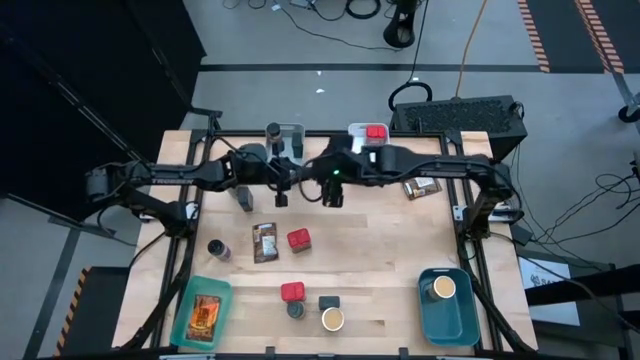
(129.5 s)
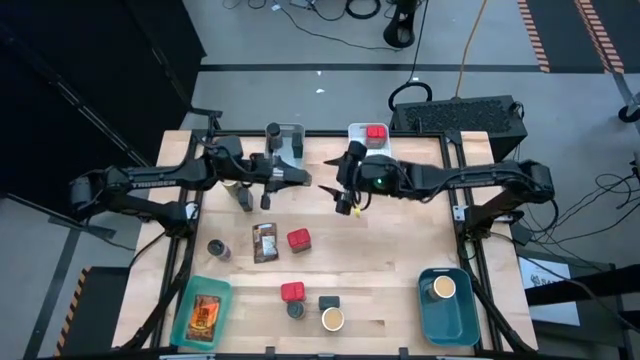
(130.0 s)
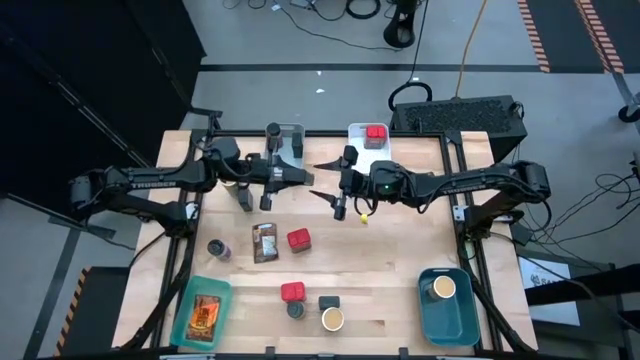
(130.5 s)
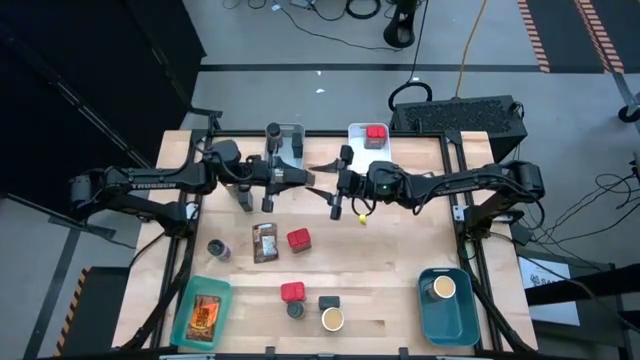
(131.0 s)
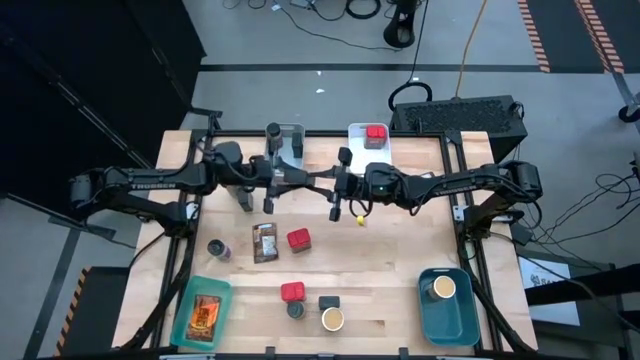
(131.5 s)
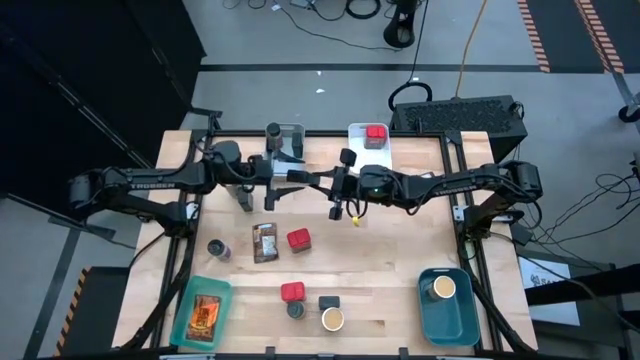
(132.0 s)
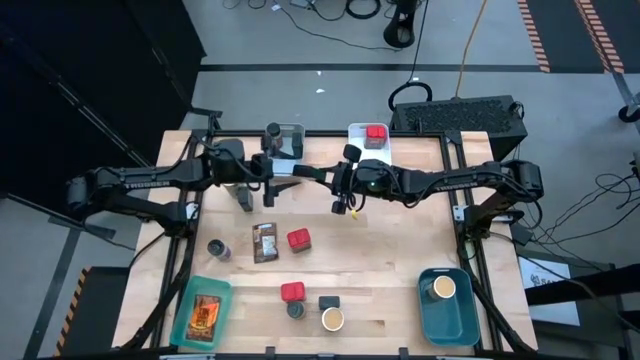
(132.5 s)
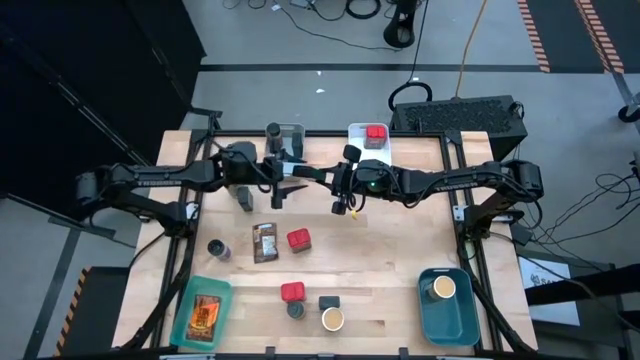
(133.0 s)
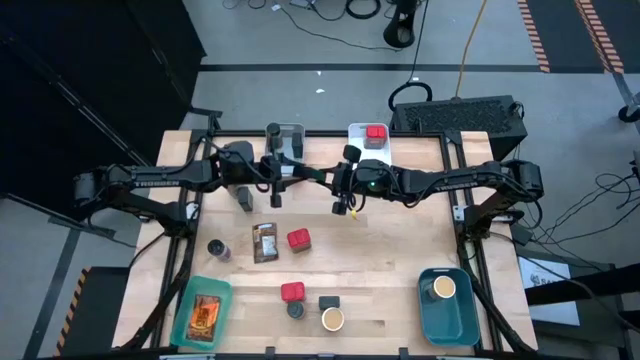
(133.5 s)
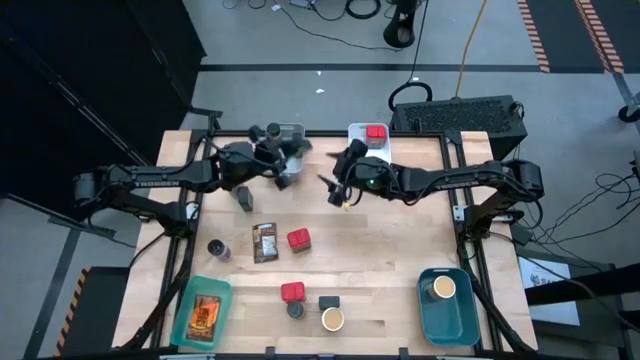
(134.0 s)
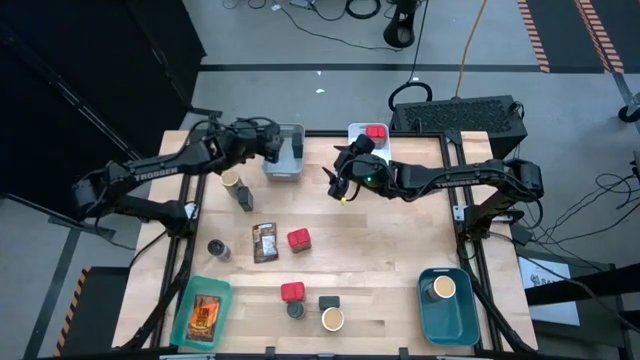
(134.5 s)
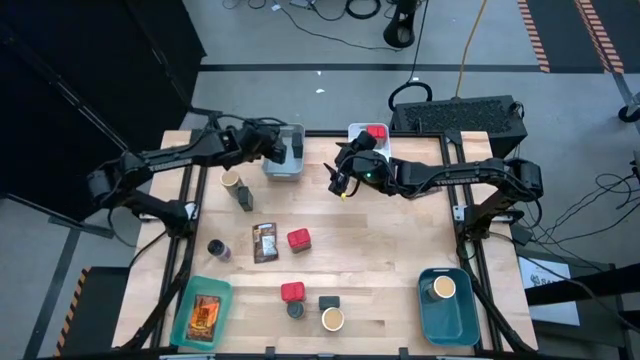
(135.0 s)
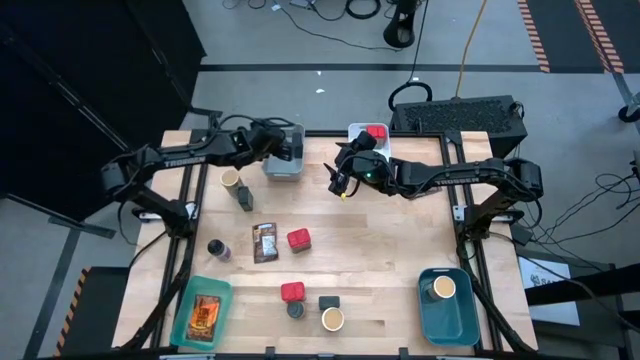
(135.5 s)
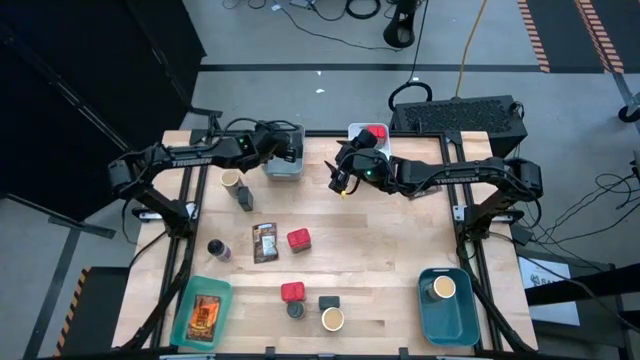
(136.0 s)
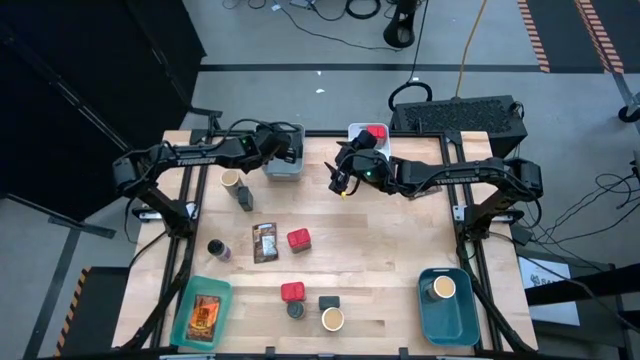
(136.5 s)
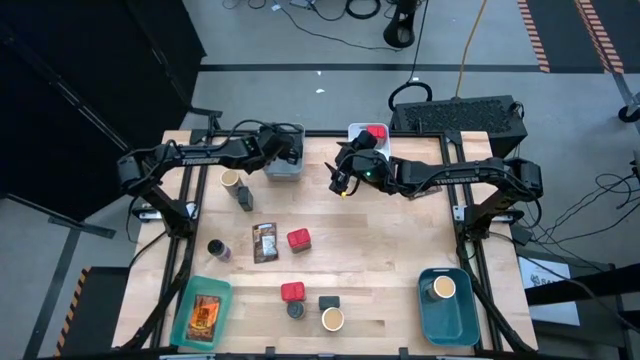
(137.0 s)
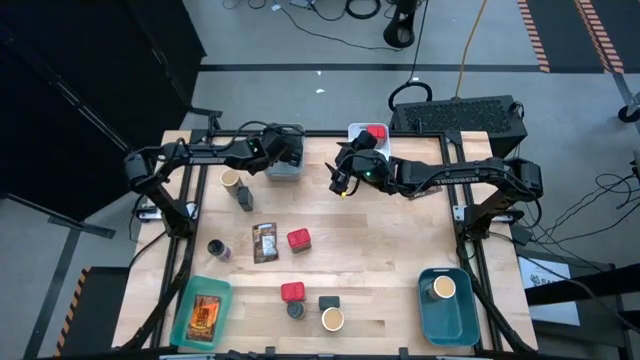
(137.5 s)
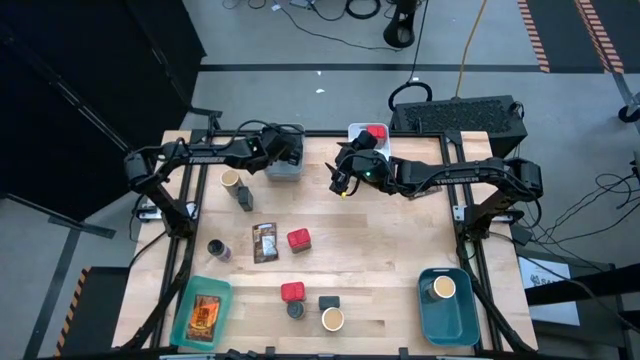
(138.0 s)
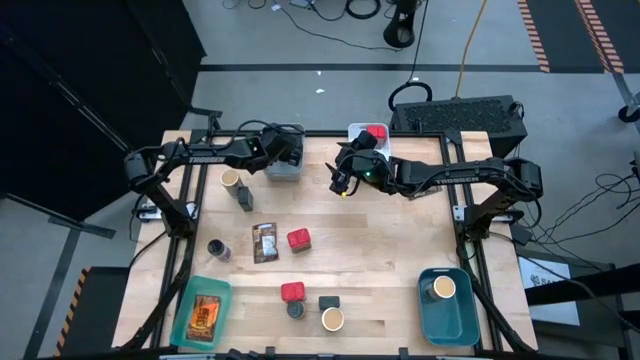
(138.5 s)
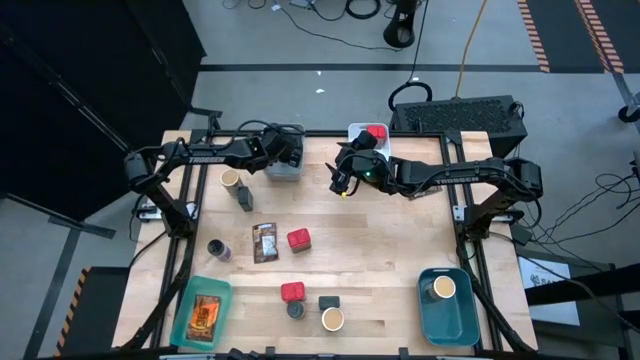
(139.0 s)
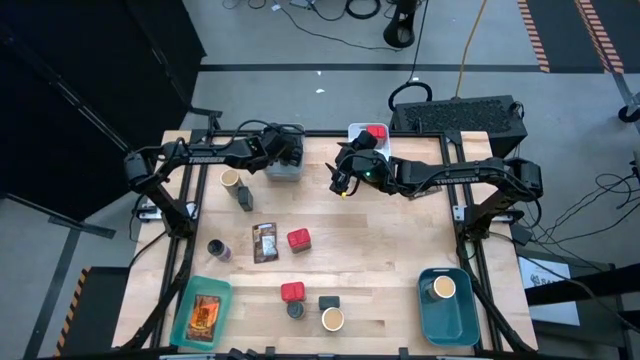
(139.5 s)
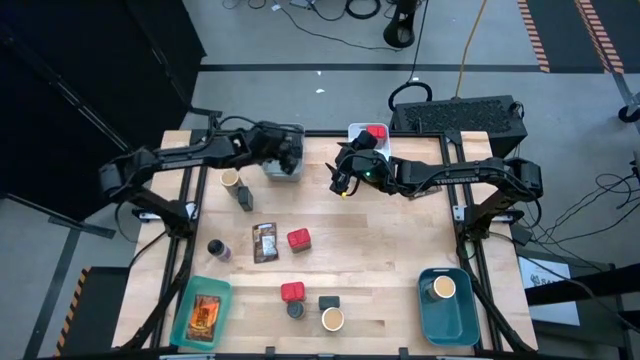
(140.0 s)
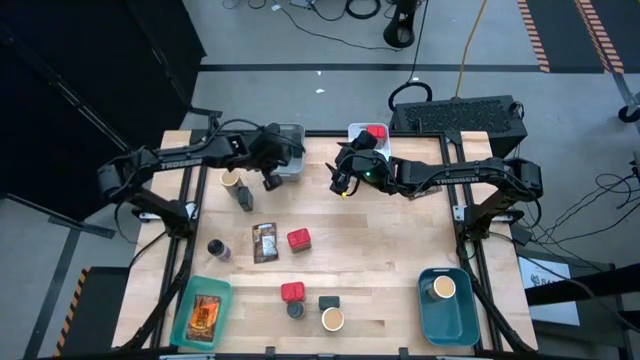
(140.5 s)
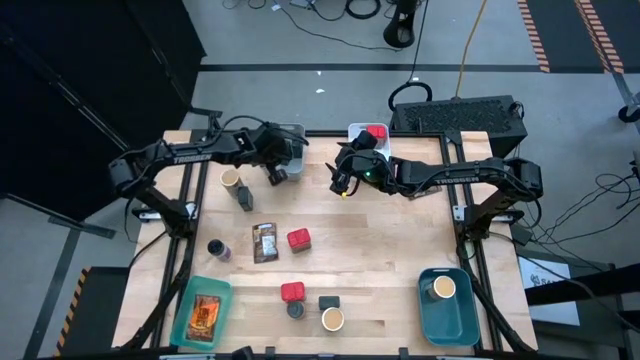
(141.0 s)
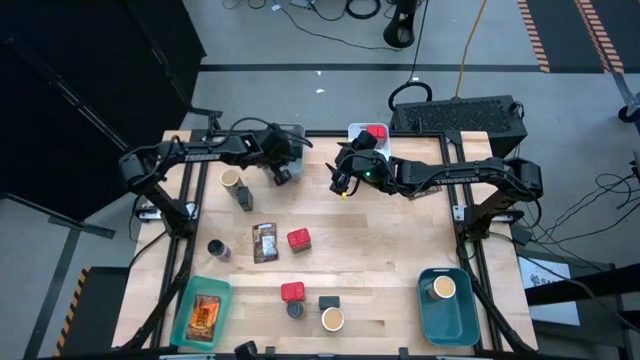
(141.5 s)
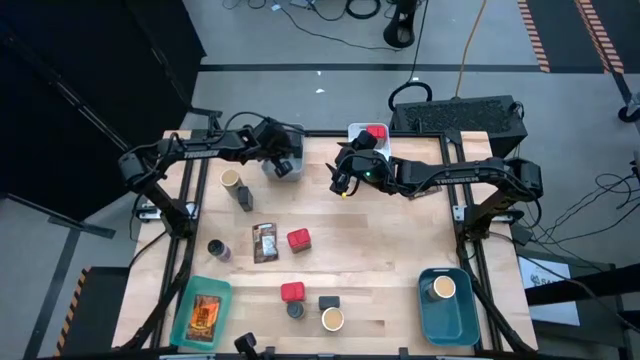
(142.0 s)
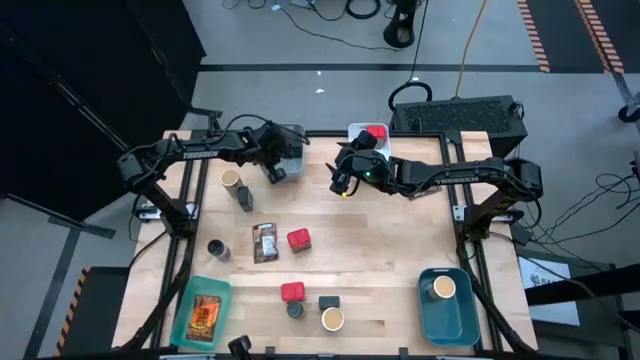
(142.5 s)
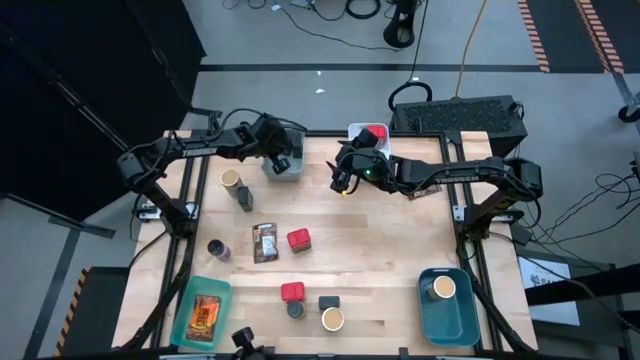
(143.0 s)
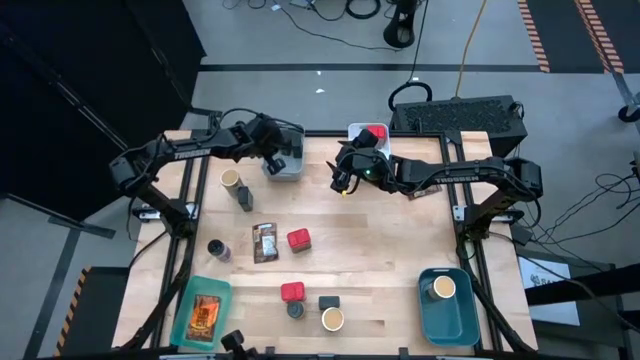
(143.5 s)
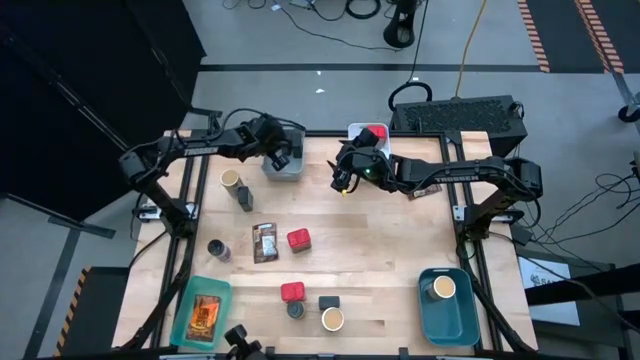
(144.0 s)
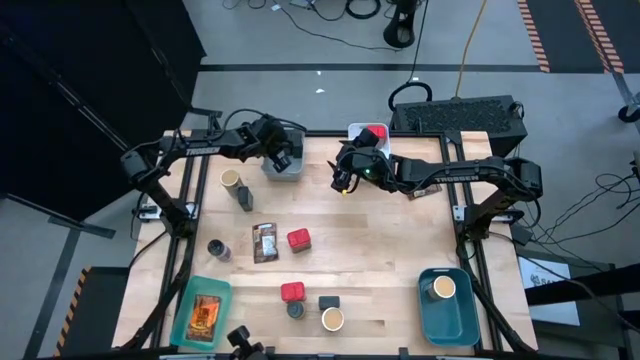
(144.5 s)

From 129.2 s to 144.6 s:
Task: Sort spices by type
Put the black spice can into the gray bin

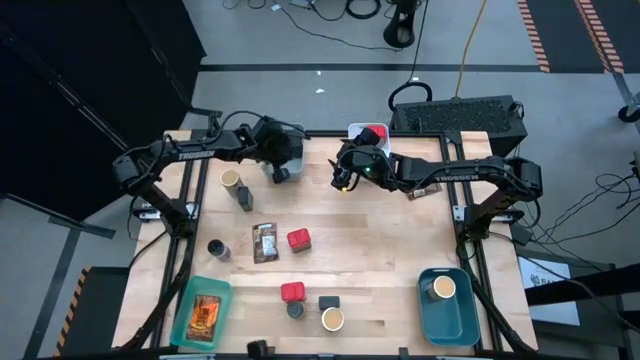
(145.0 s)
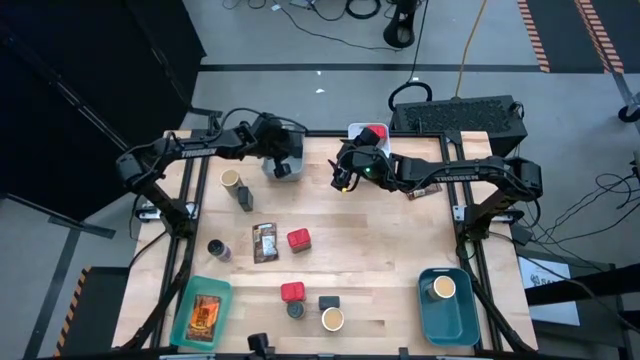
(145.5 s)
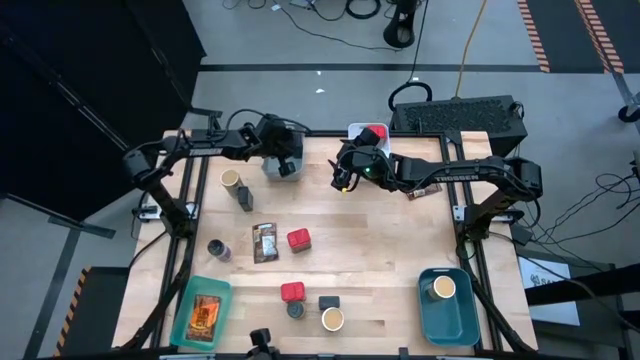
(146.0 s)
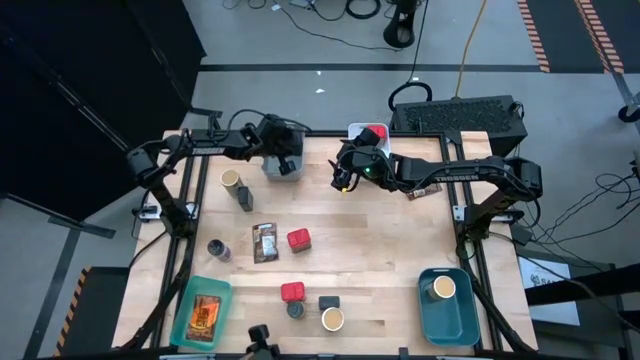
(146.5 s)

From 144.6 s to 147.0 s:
Adjust the black spice can in the gray bin

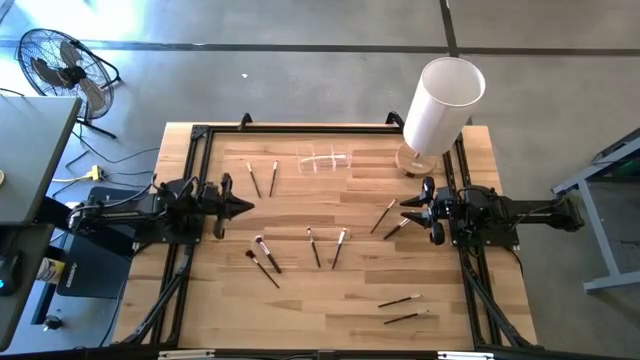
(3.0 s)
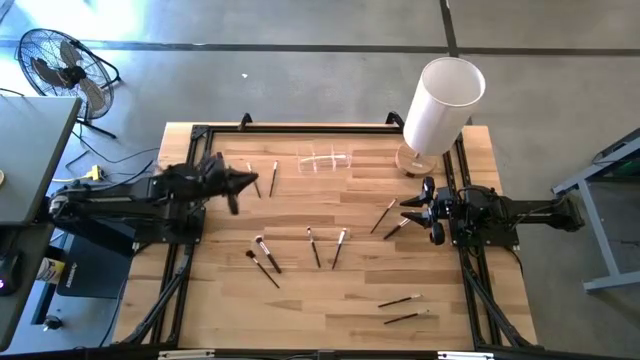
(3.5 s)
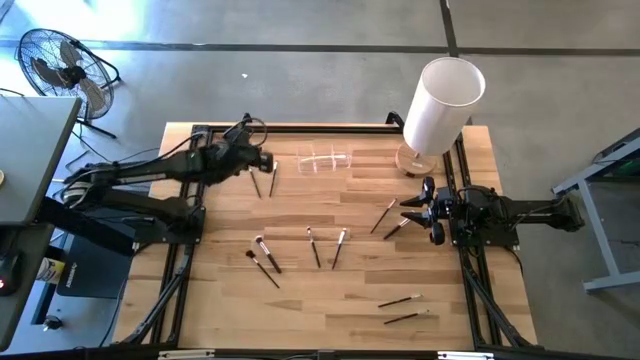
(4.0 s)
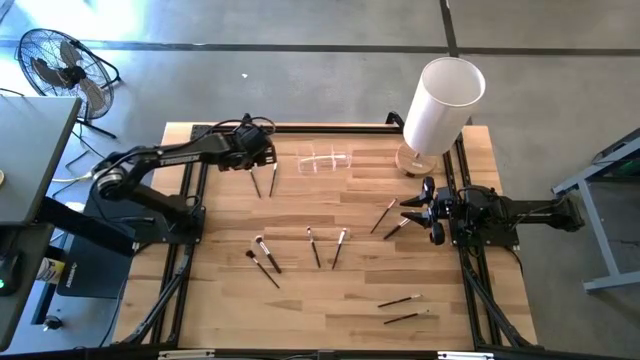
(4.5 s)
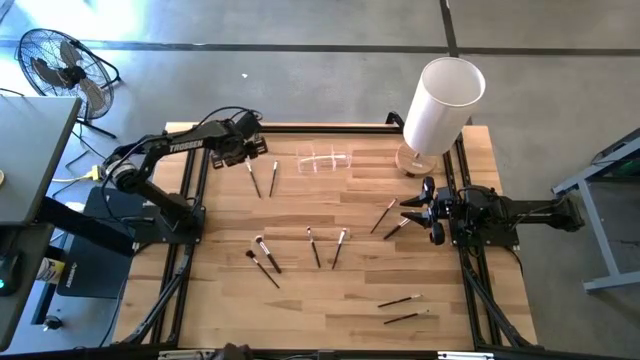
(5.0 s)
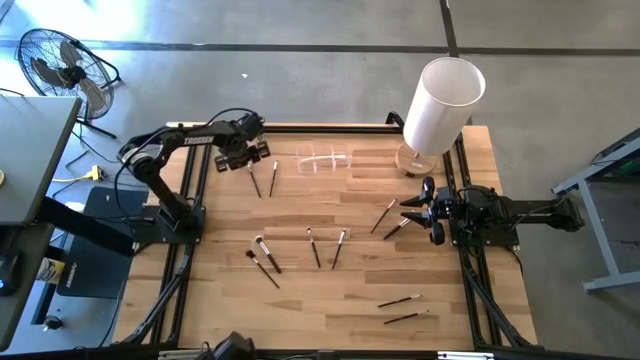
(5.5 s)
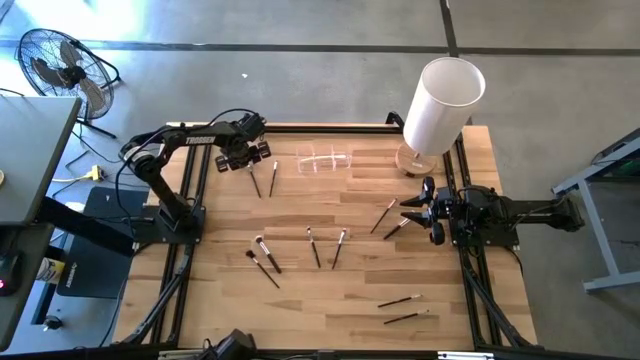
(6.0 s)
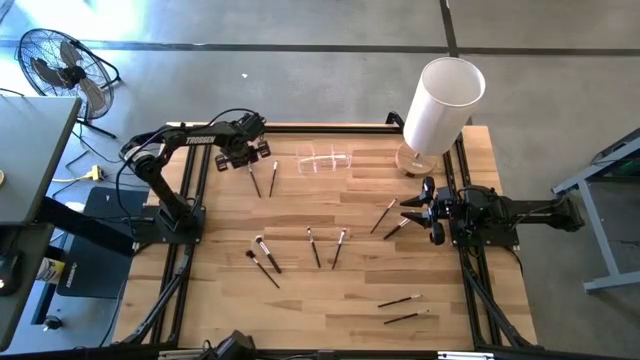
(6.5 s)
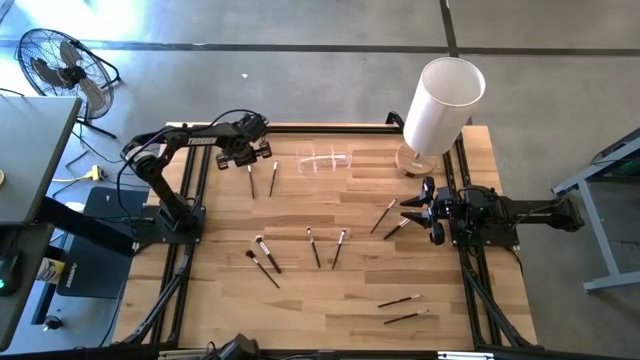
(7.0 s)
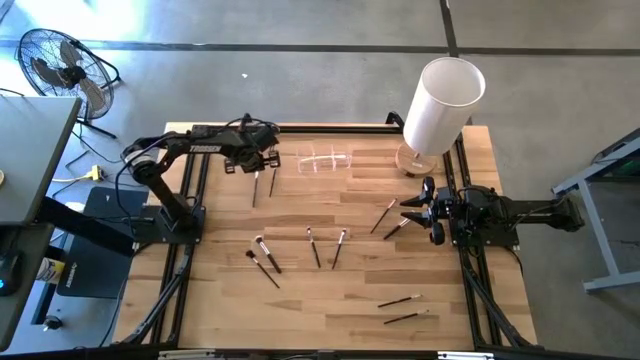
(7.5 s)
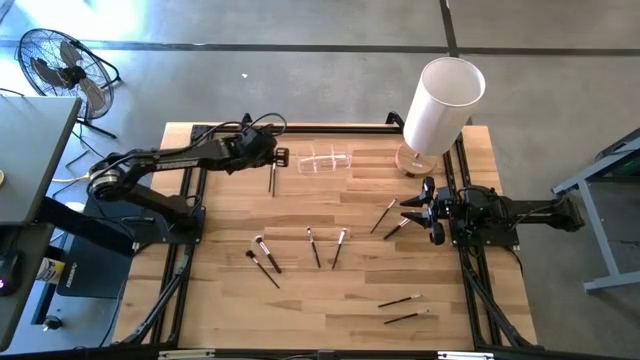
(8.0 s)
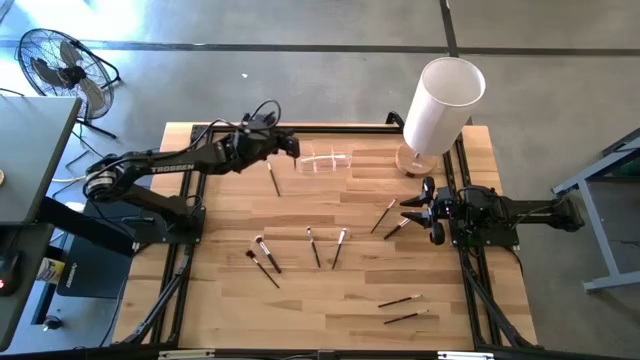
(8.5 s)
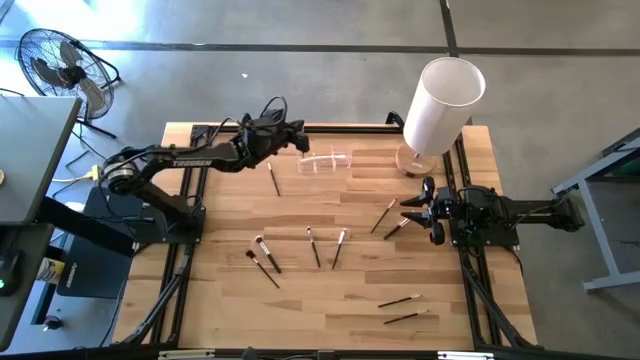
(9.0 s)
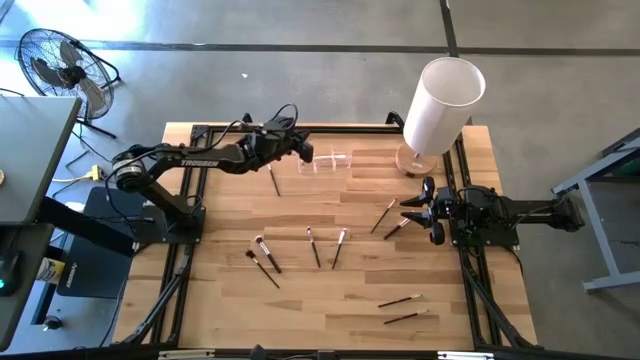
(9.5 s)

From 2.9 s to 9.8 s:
Task: Pick & Place Makeup Brushes
Put the black eyeshadow brush into the transparent organizer
